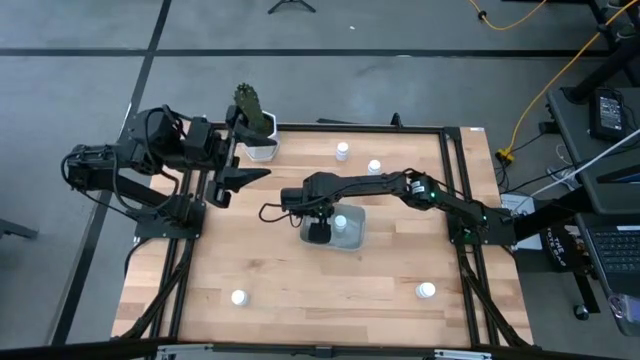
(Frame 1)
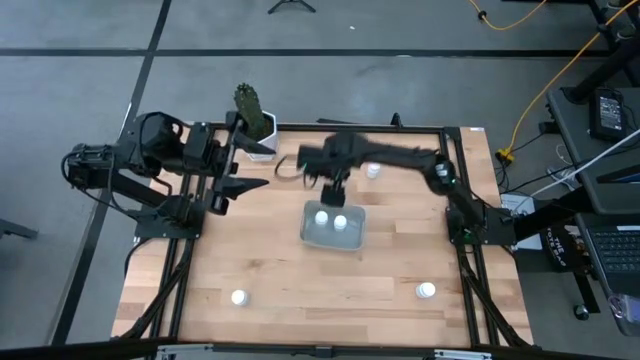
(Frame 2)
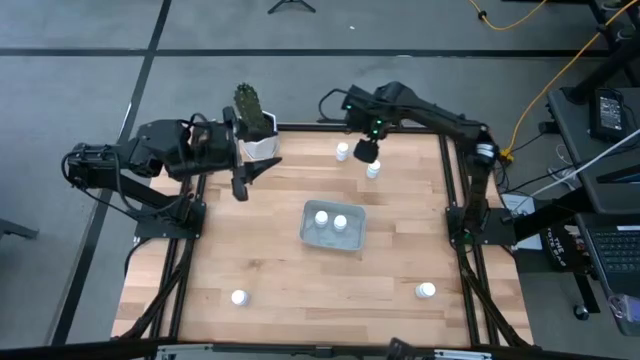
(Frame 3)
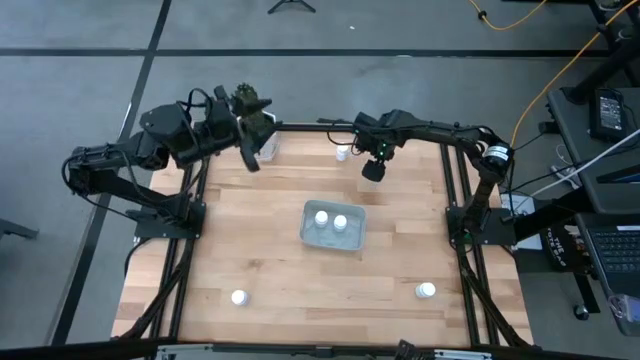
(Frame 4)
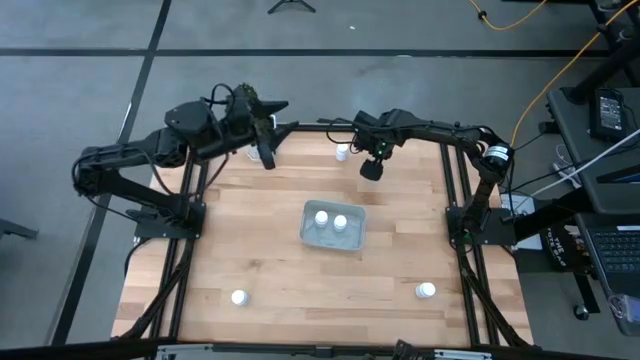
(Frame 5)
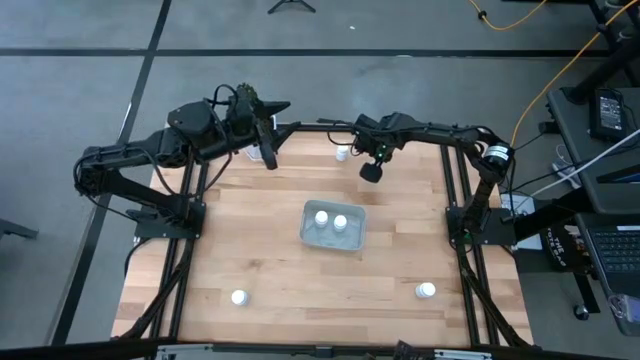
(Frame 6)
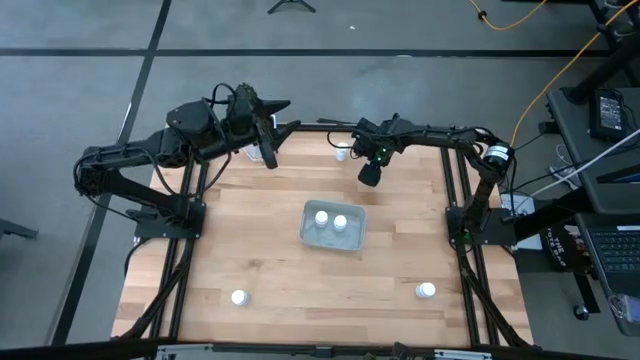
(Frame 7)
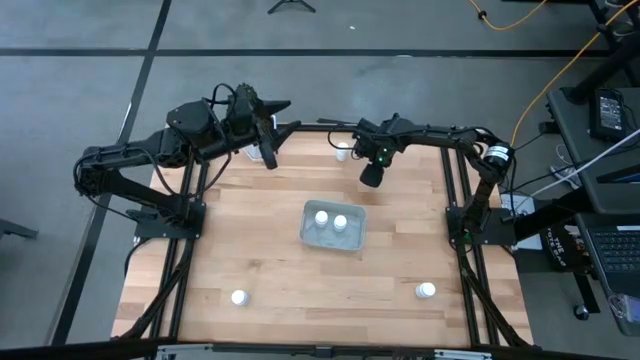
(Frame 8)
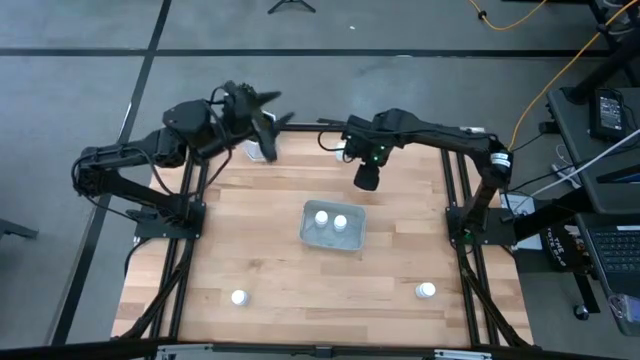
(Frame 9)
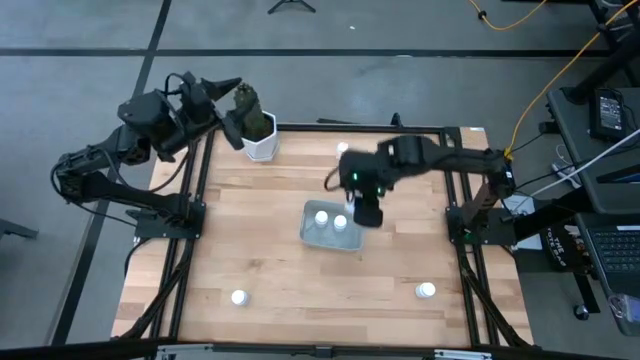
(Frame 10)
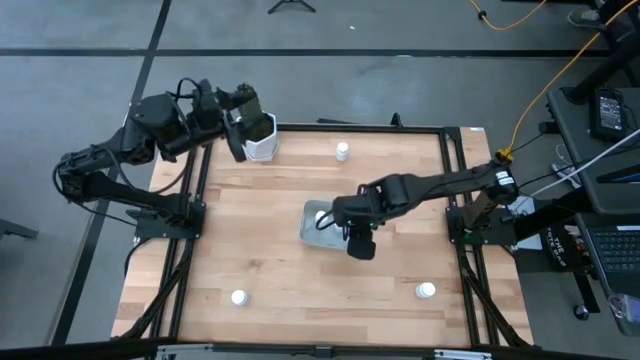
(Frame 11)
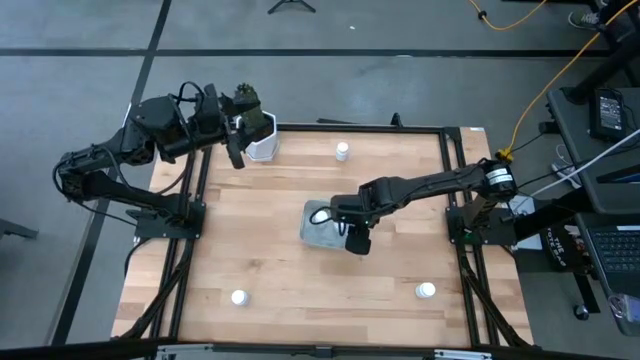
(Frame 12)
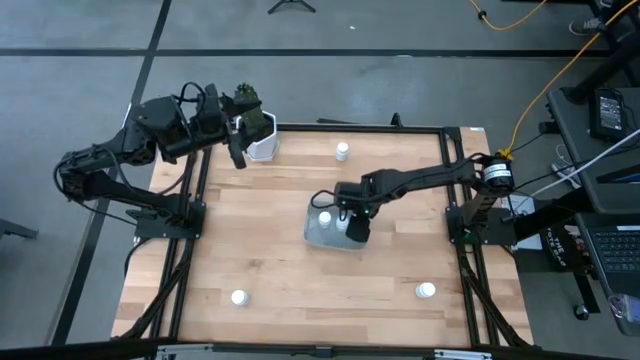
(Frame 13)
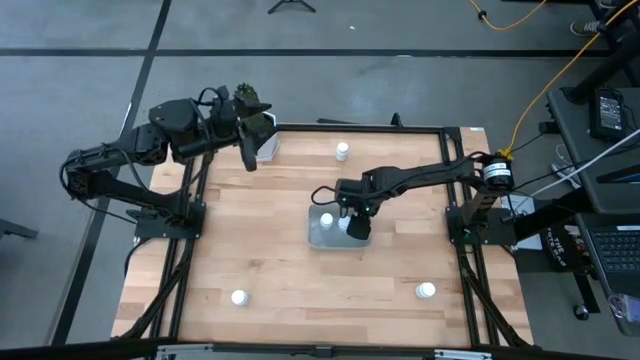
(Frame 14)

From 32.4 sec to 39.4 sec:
Task: Pick and place pill bottles into a basket
Put the white pill bottle into the gray bin

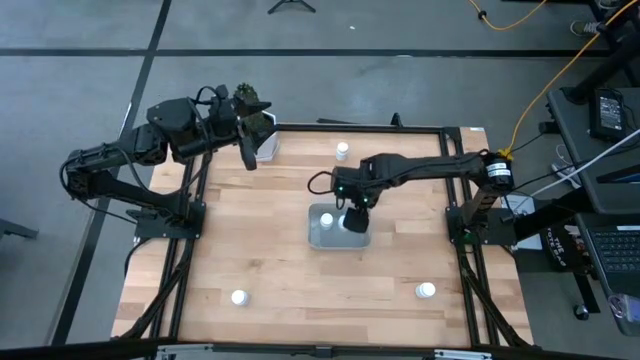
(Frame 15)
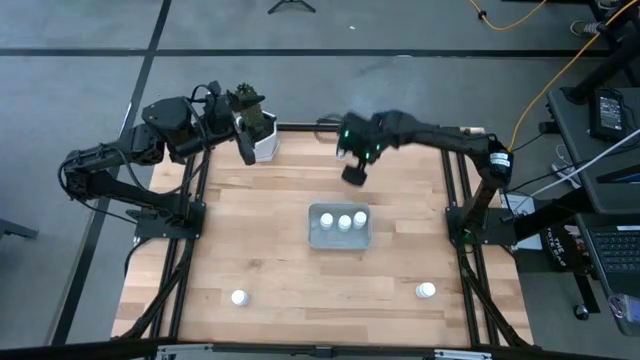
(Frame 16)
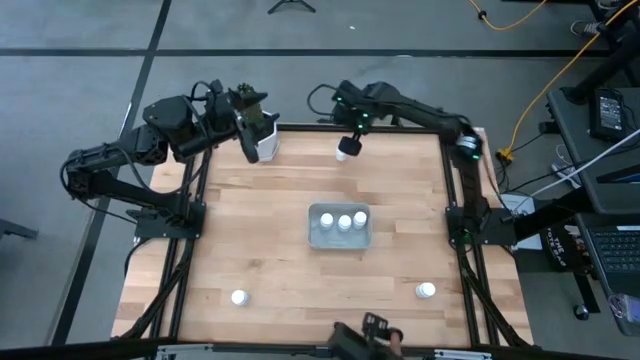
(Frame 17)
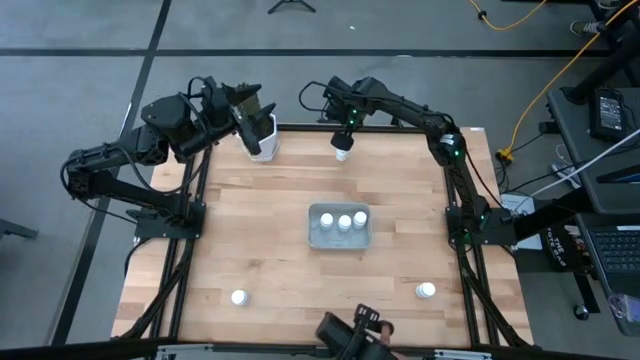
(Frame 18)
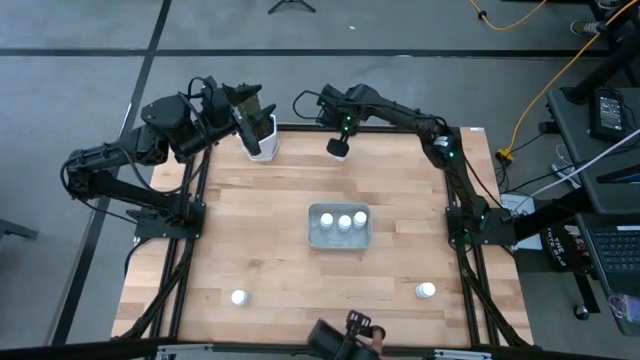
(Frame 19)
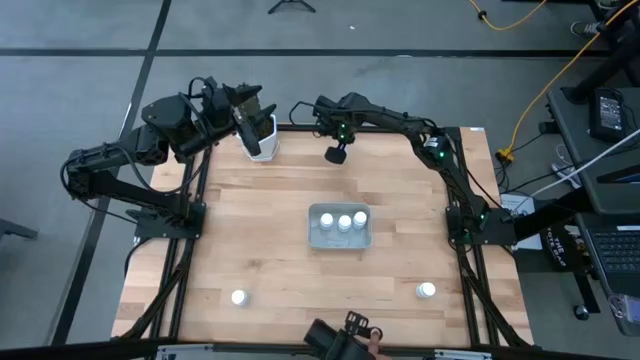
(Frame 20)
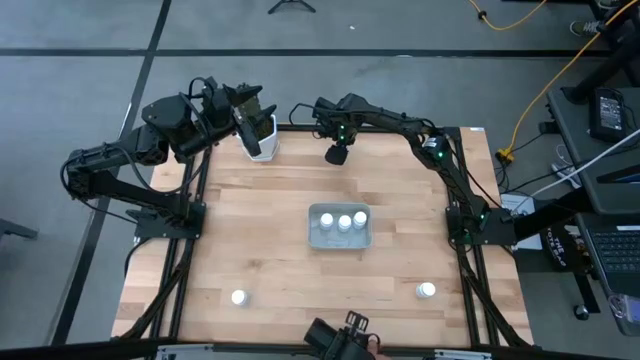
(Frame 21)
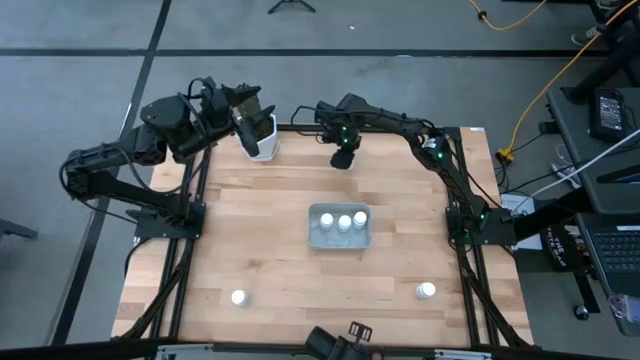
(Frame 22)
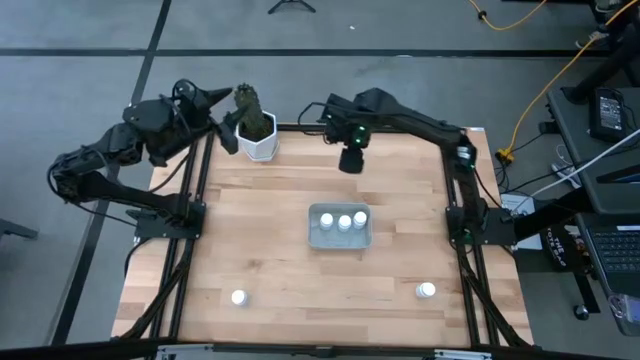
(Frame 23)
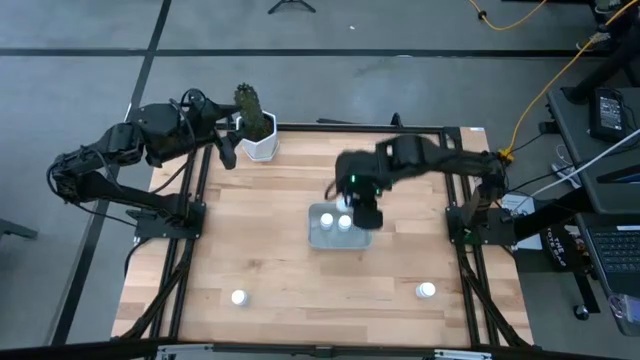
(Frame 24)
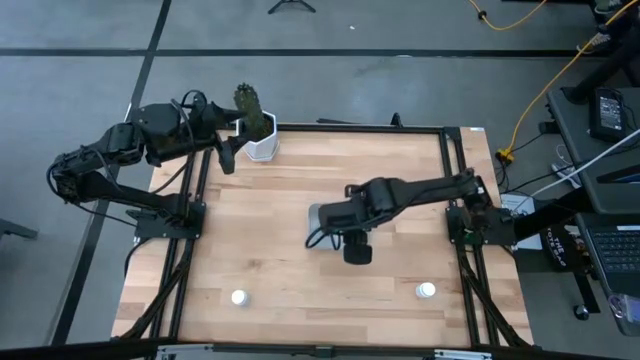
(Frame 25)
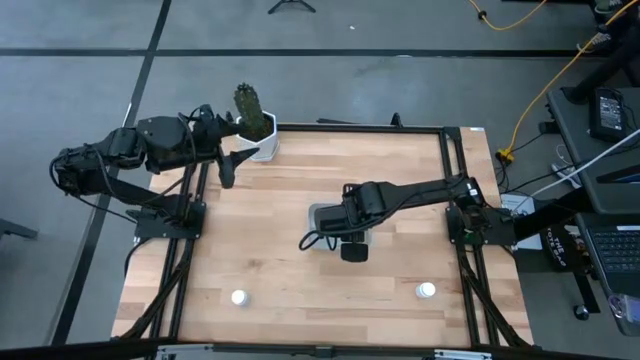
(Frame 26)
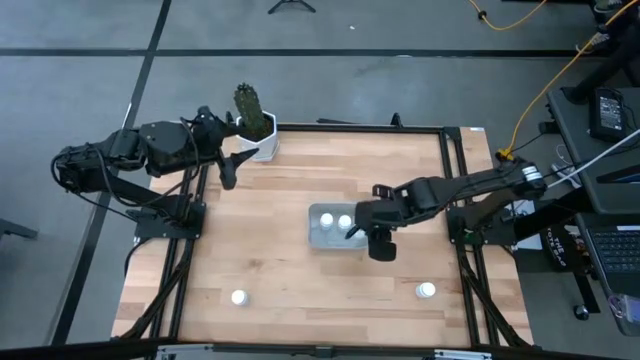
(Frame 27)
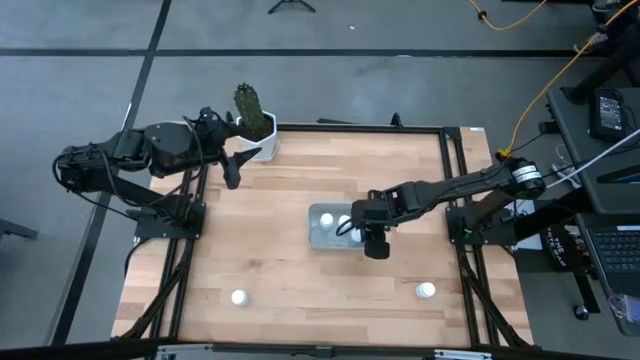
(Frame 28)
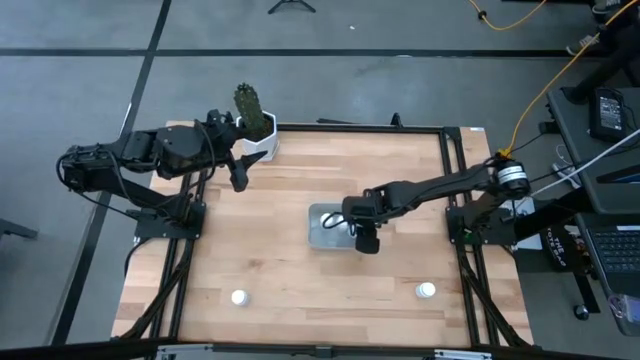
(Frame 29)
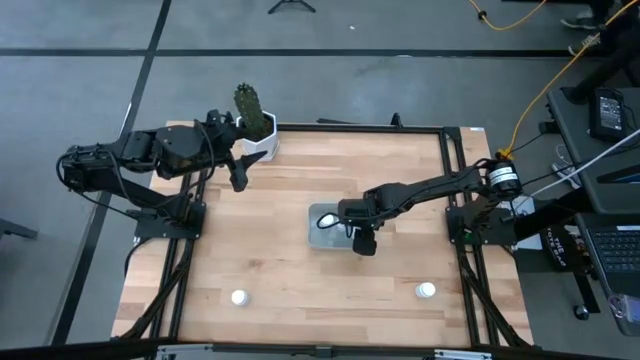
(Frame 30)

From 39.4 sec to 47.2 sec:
Put the white pill bottle into the gray bin

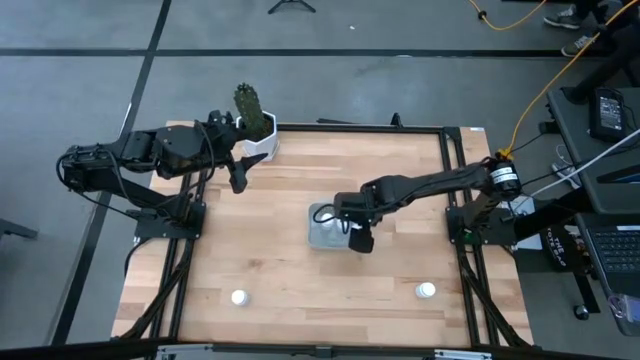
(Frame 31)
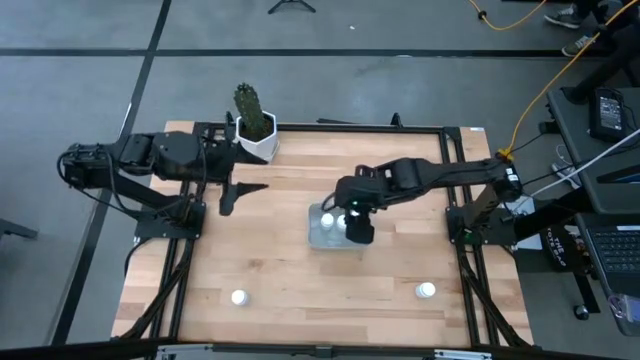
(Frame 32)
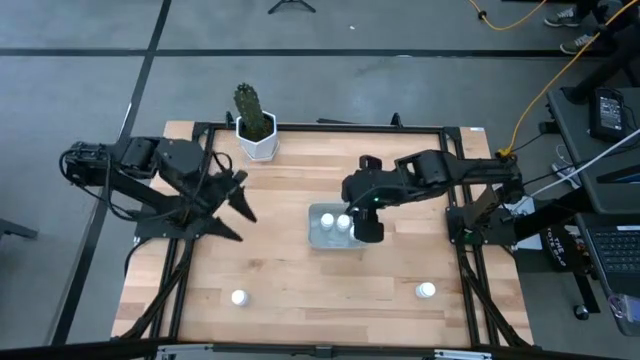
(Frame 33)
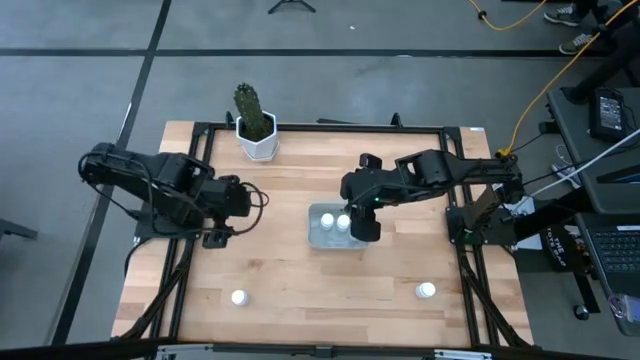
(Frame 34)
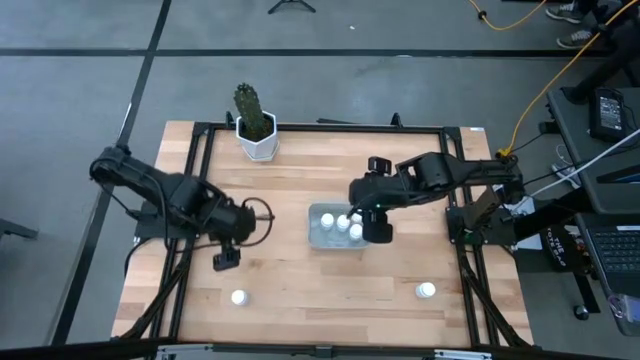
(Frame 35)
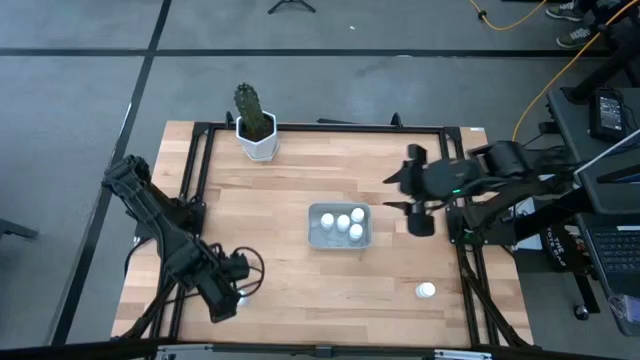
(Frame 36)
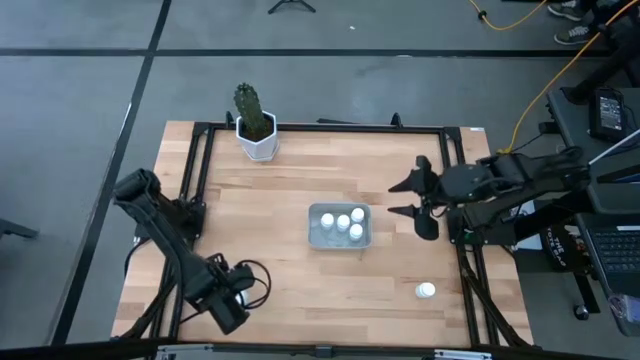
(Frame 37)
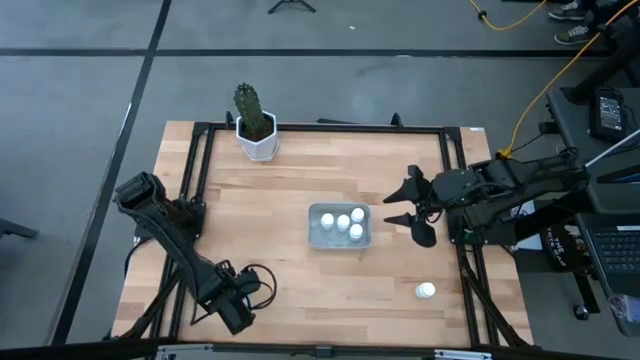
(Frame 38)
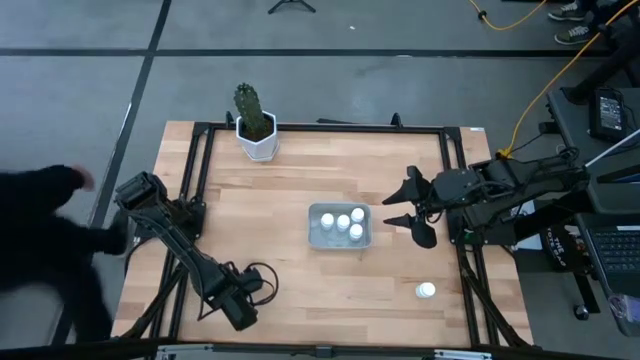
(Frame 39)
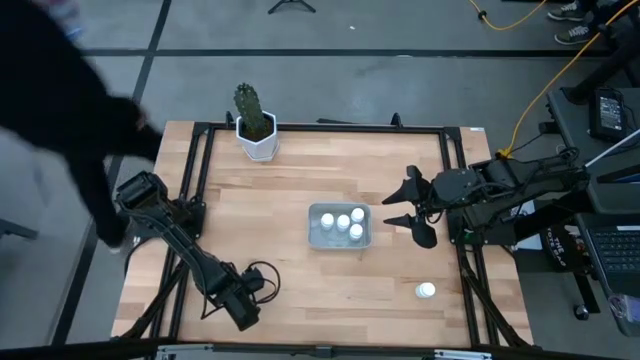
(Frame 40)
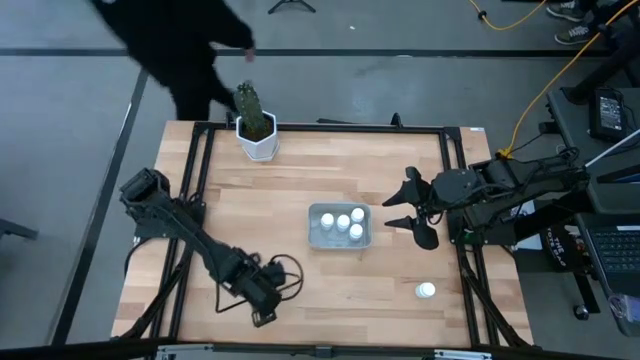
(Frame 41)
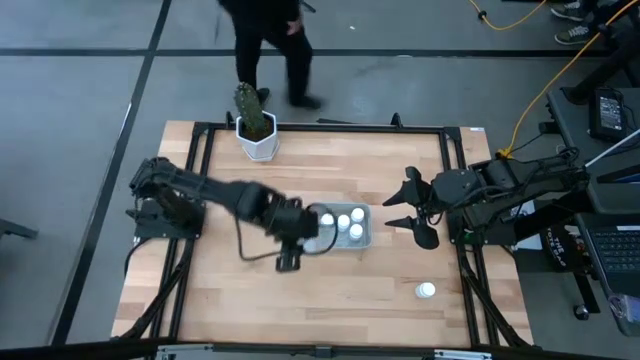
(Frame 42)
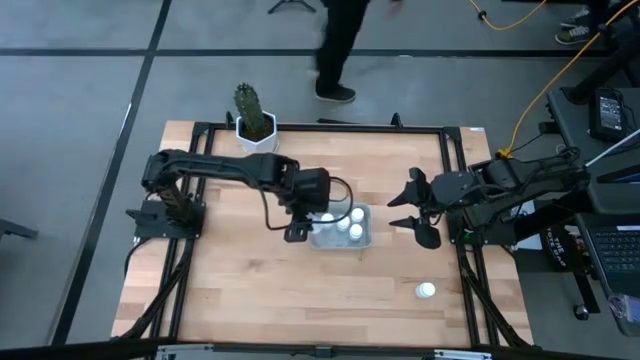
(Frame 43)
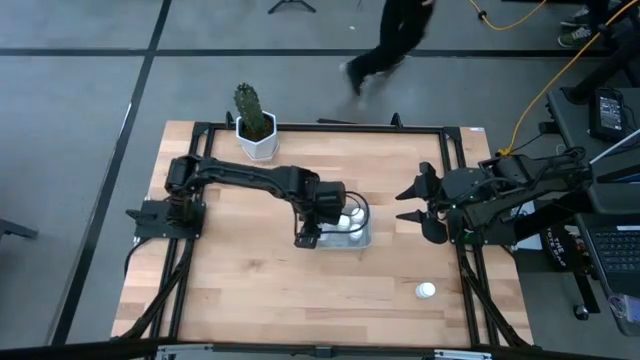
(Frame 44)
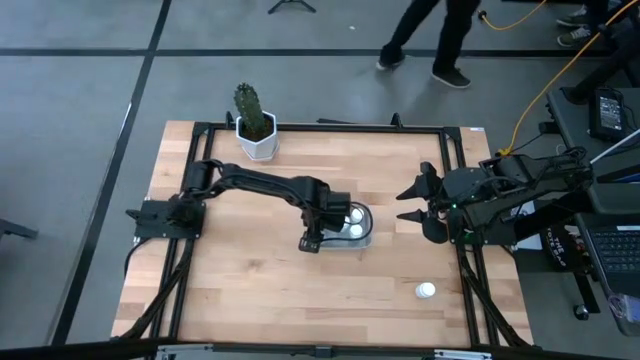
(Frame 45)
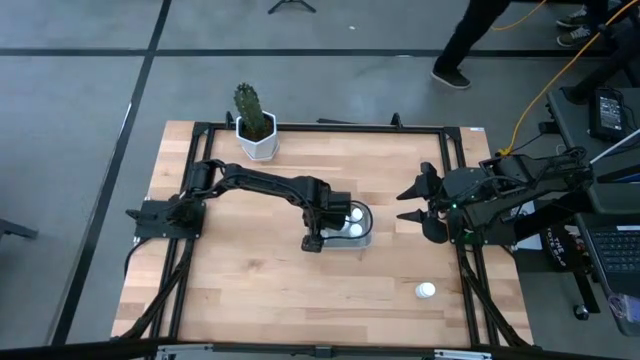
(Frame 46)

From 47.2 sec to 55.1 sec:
Put the white pill bottle into the gray bin
